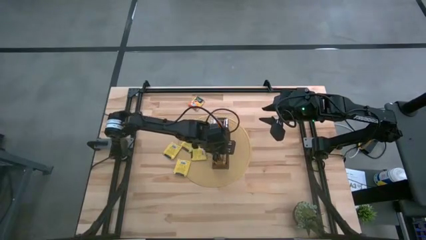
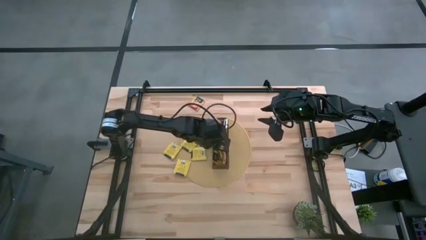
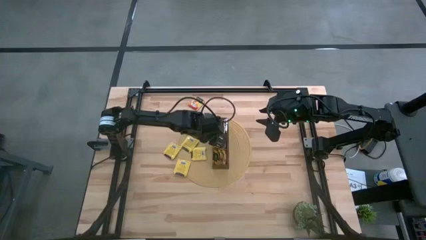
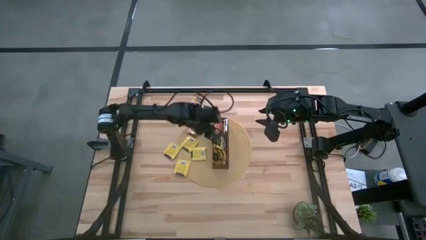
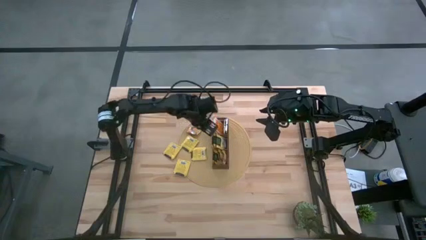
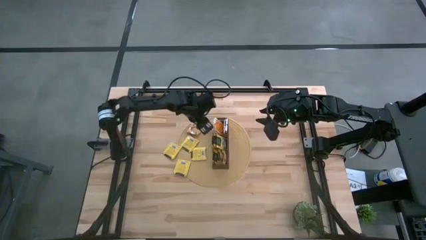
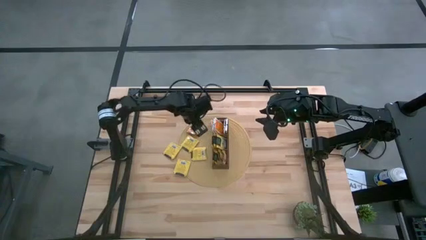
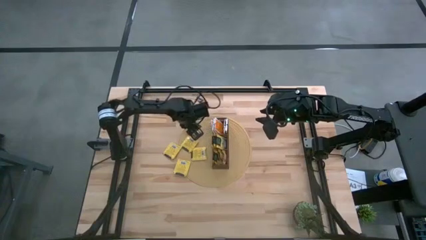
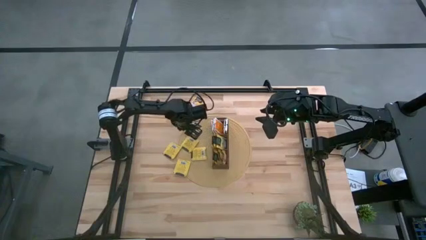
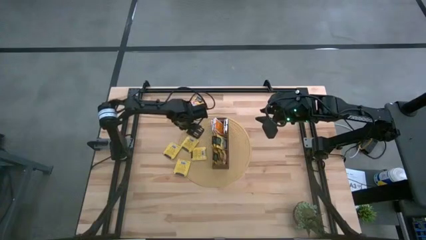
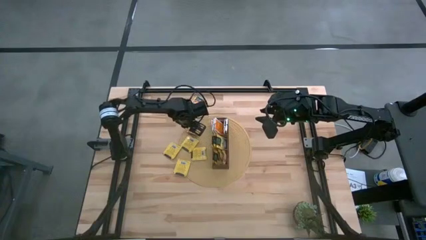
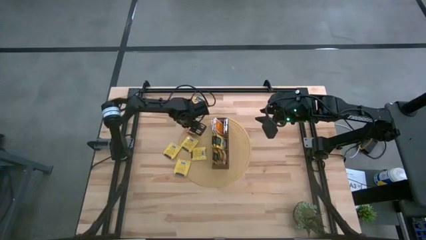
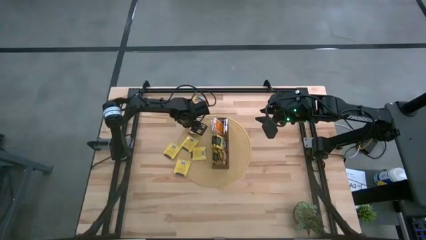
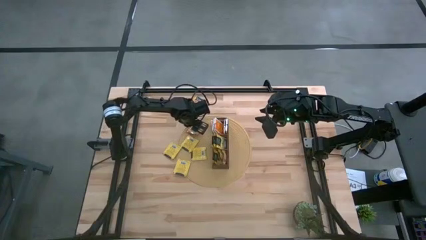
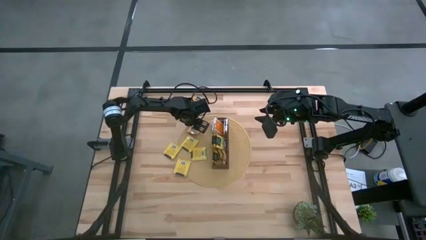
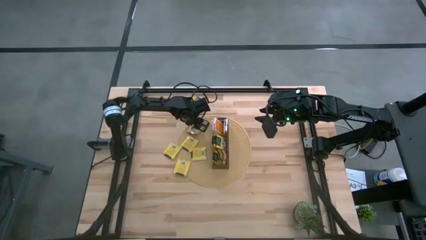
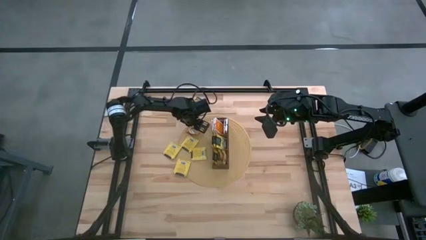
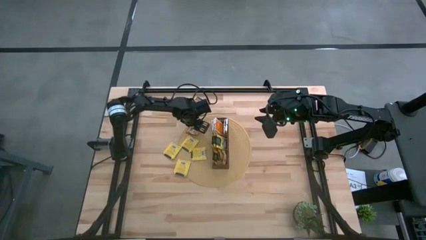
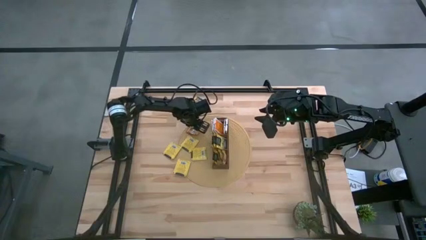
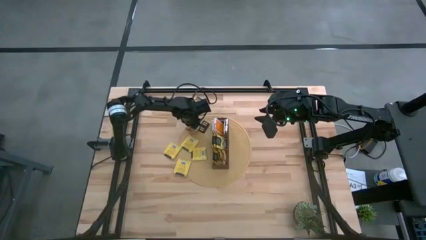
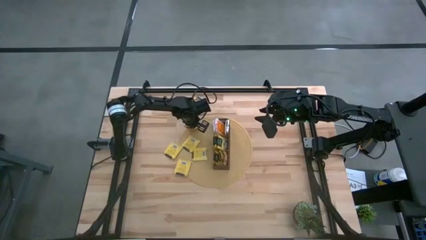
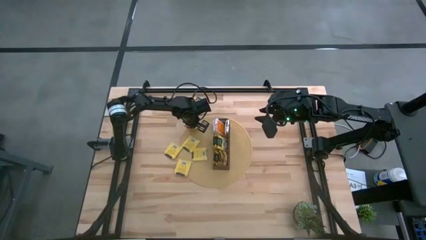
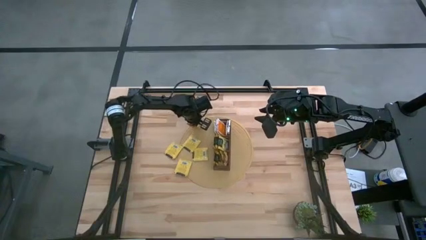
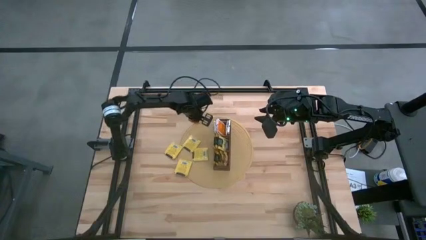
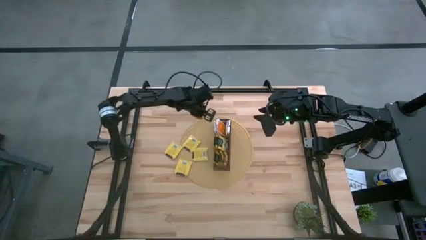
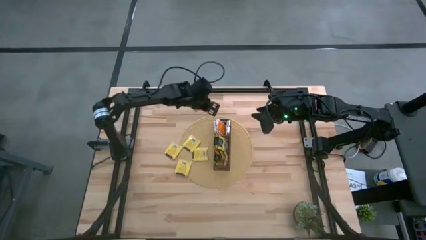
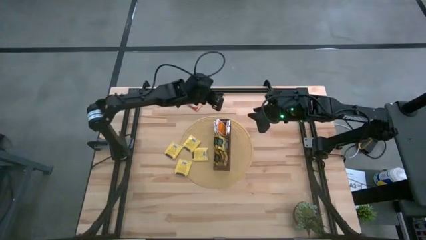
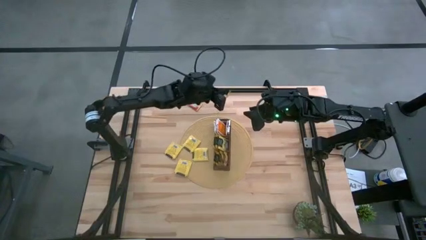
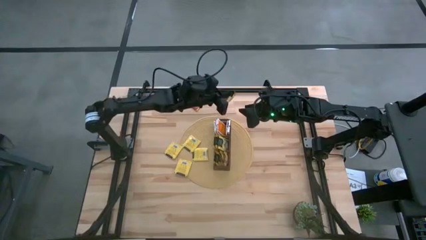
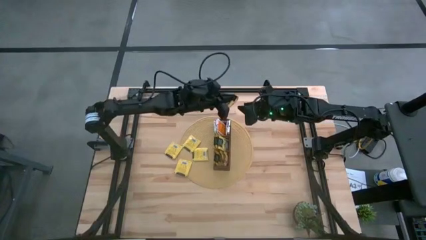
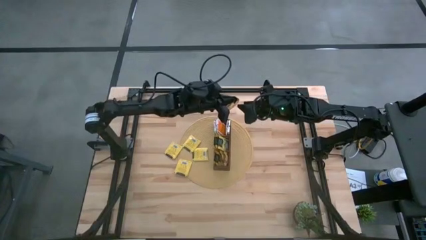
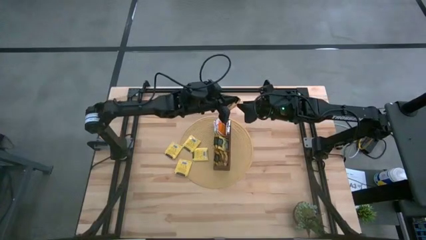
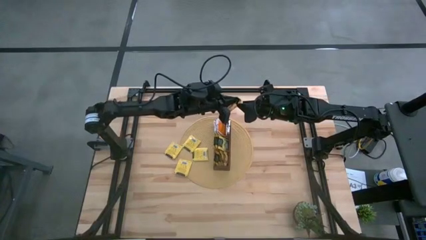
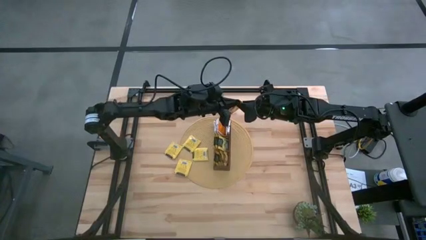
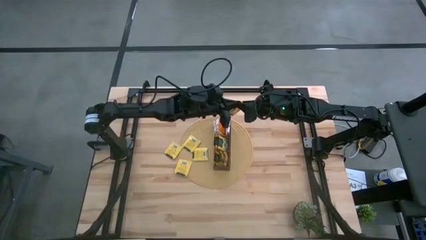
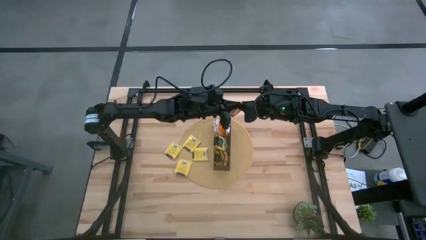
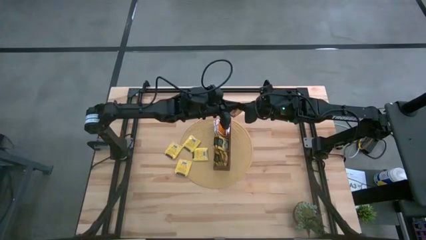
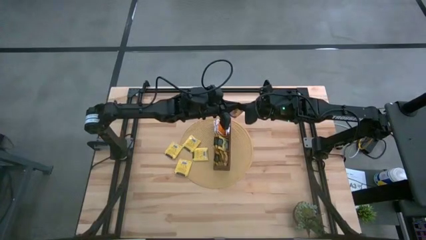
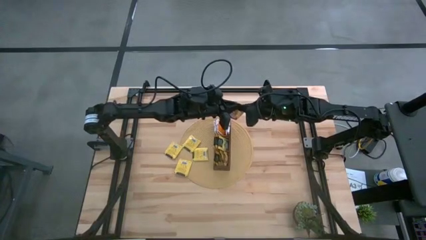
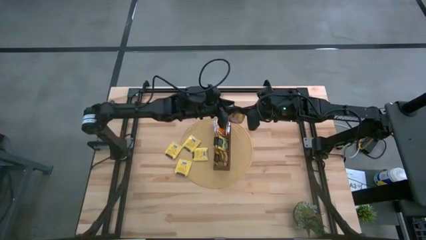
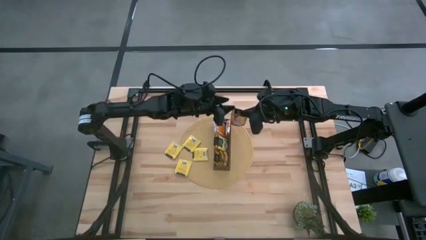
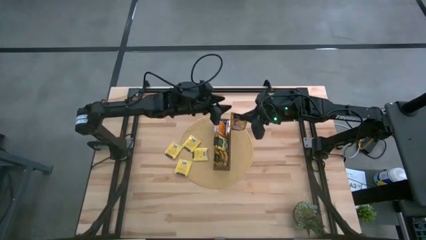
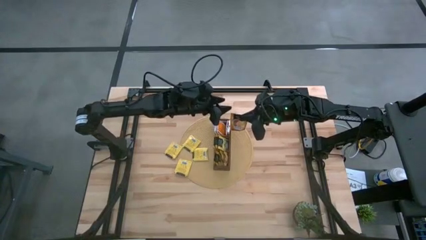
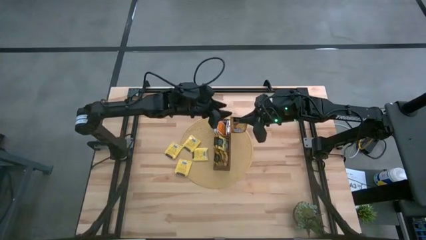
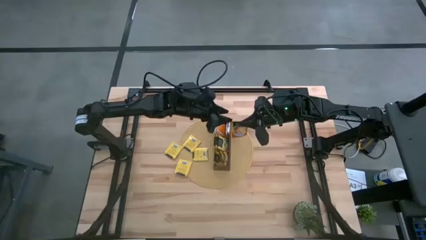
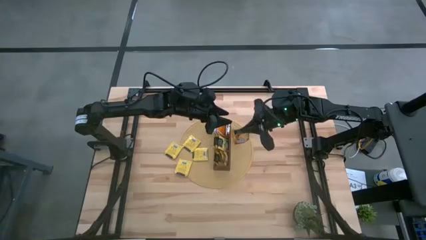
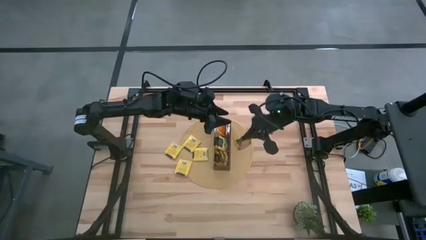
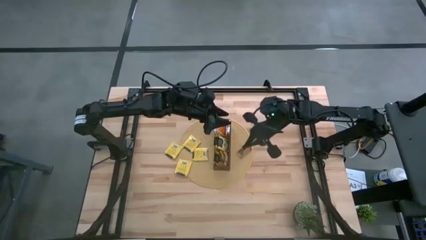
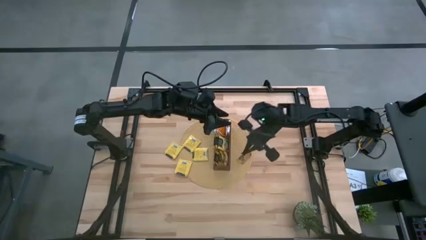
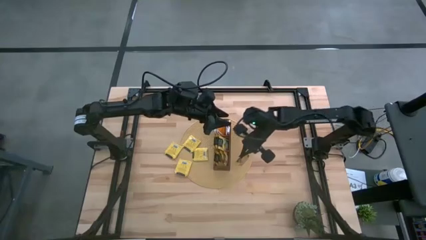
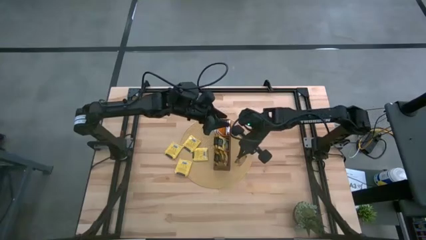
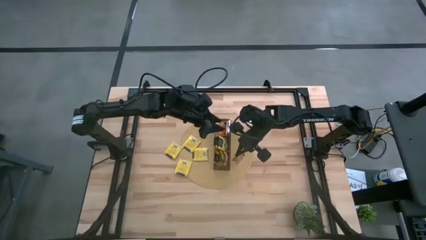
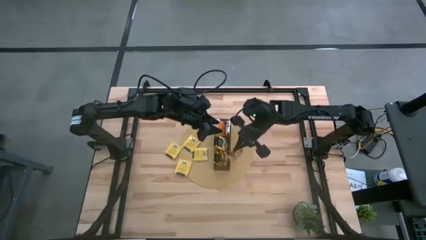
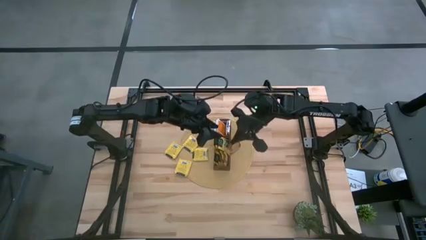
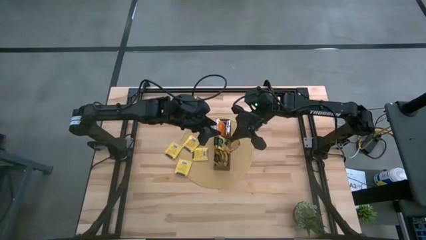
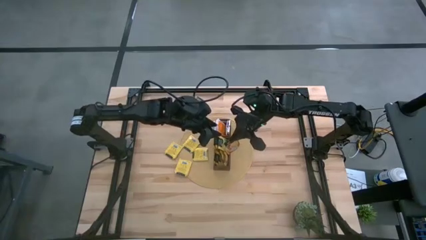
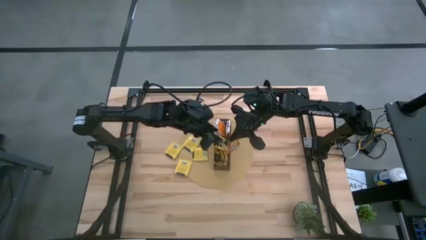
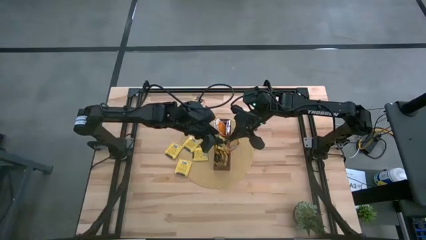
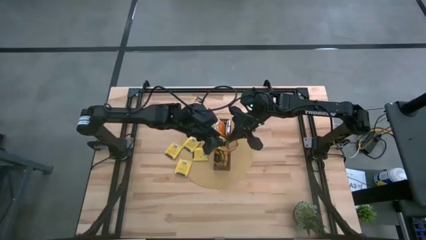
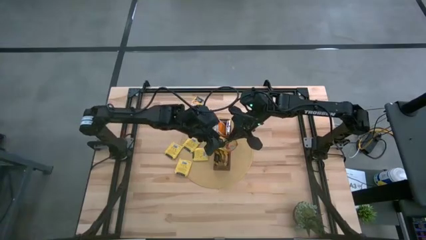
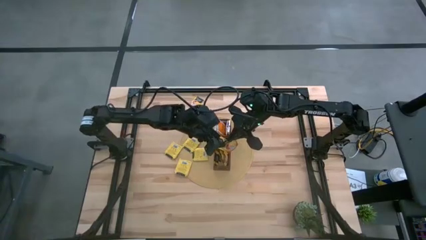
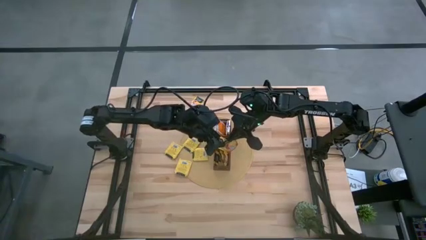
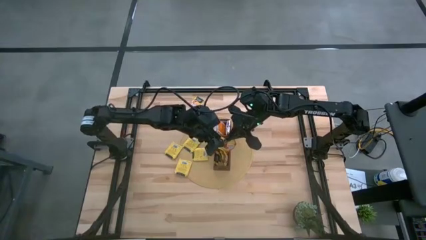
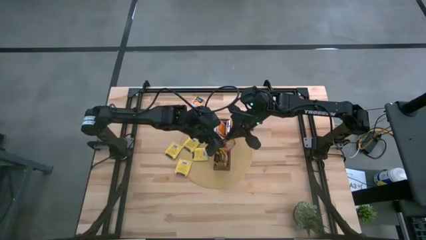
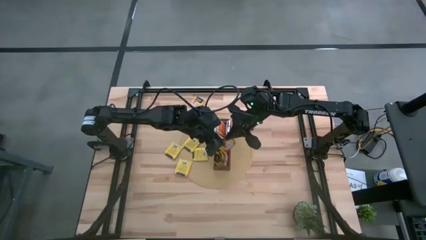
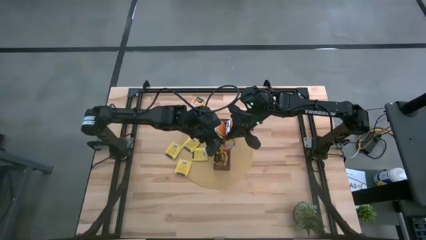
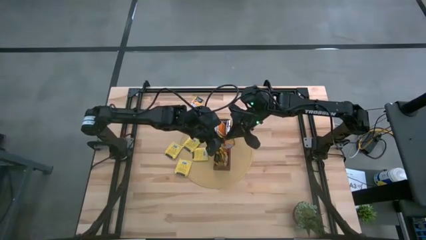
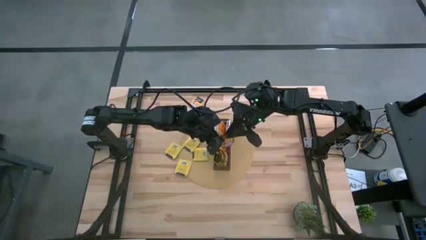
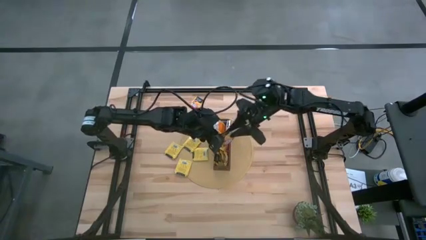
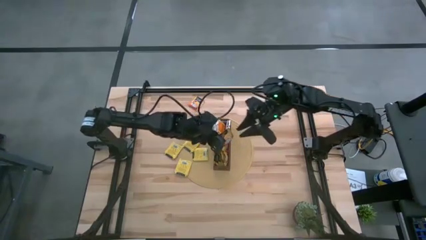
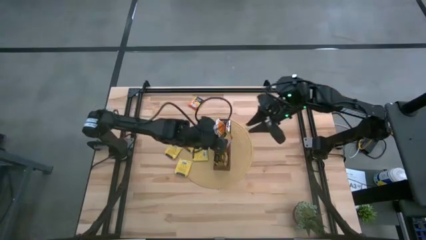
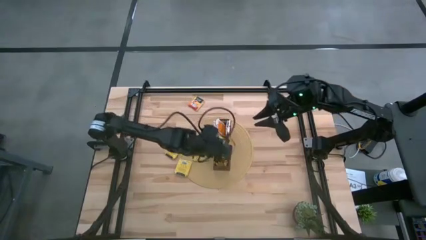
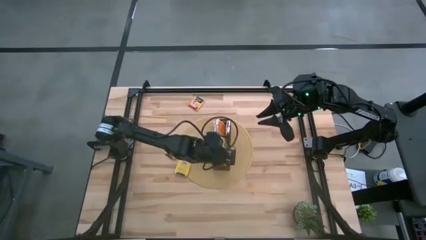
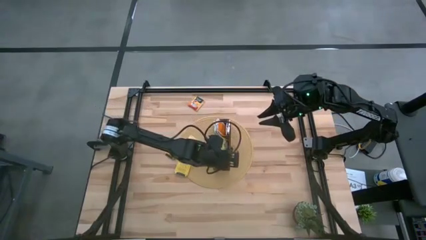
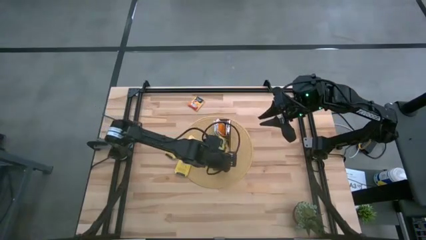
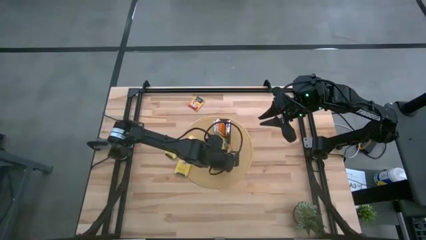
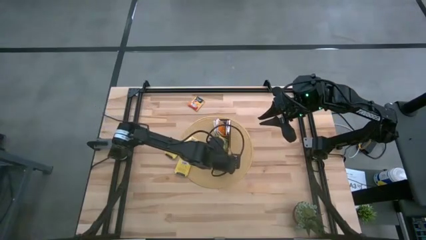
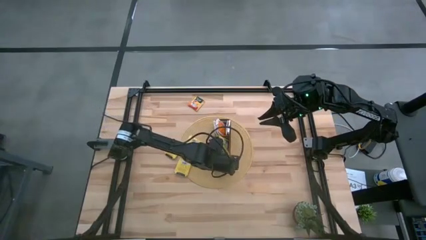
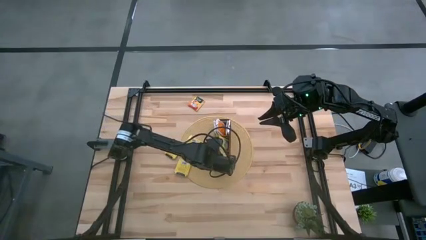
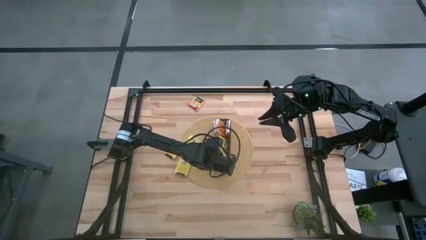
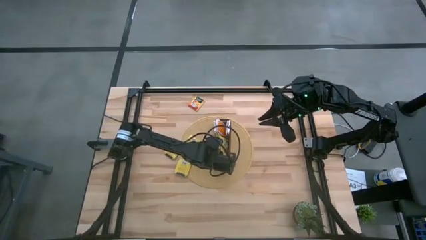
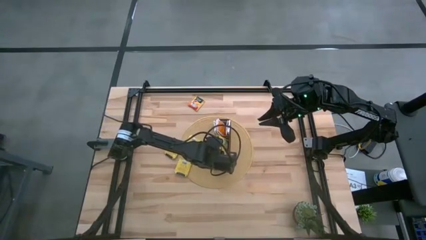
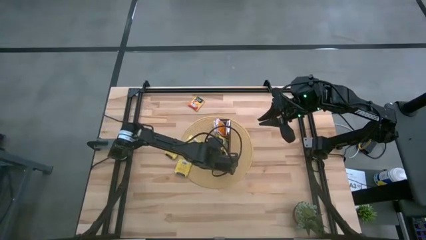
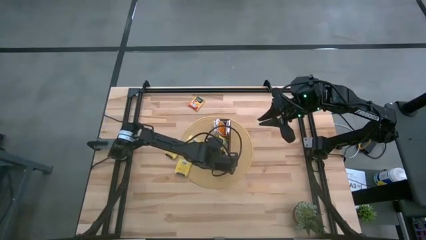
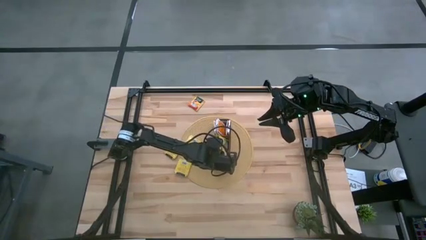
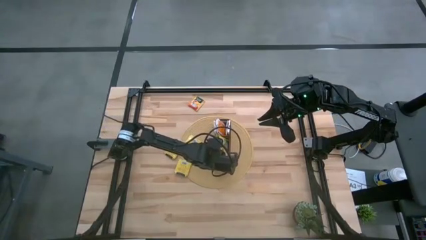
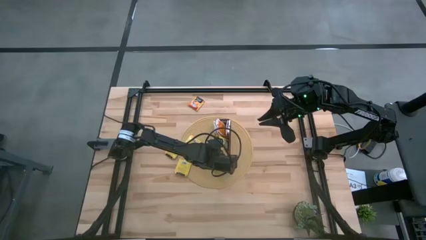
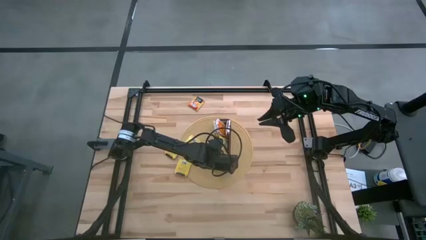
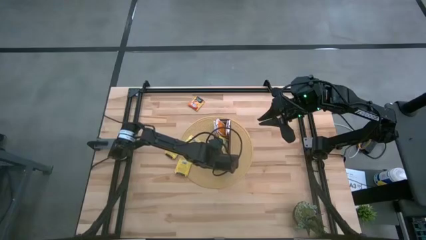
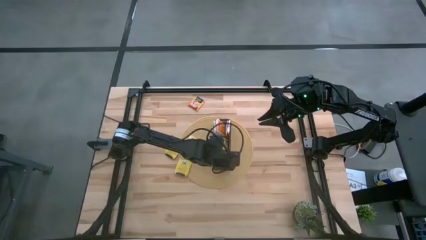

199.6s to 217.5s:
Task: Pick & Place Tea
Put the bottom orange tea bag into the bottom section of the wooden organizer
